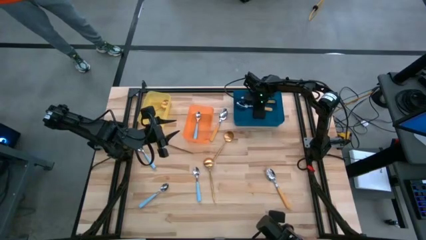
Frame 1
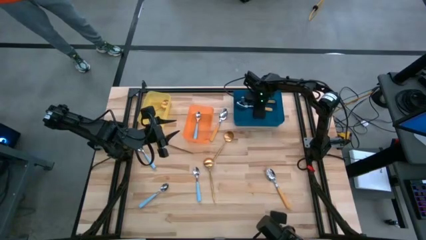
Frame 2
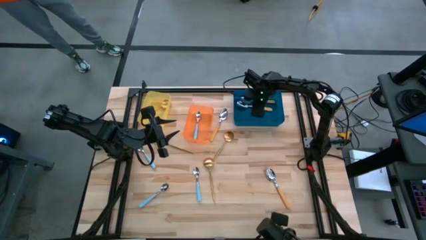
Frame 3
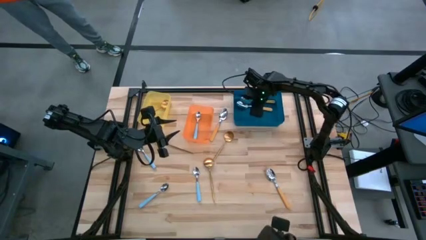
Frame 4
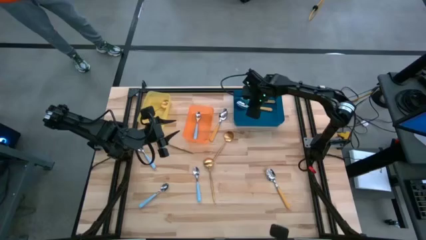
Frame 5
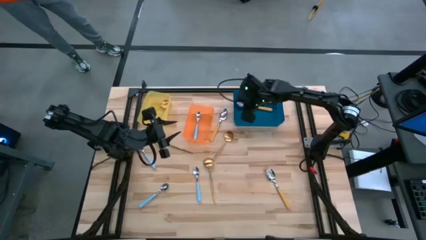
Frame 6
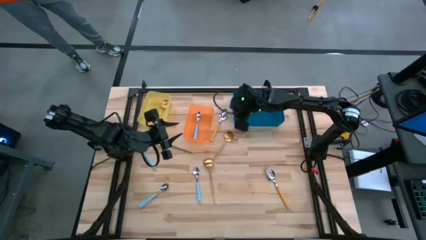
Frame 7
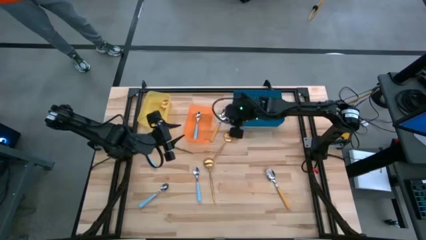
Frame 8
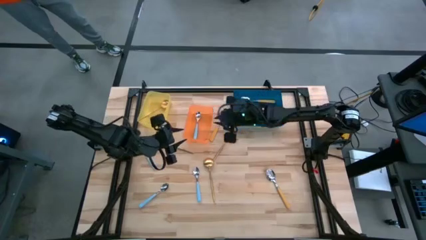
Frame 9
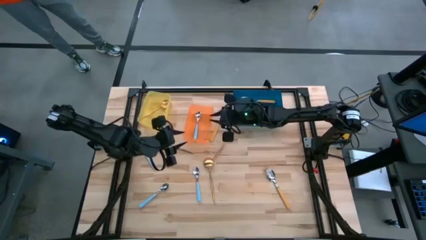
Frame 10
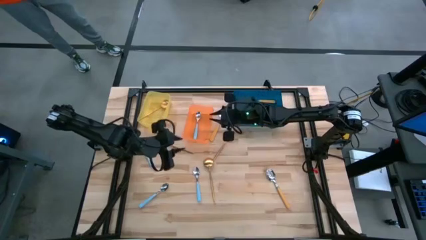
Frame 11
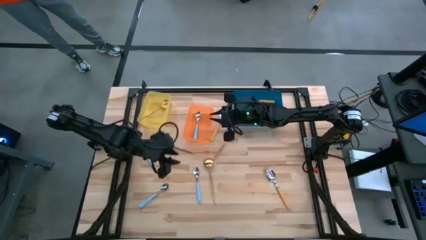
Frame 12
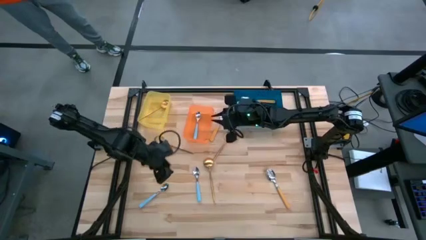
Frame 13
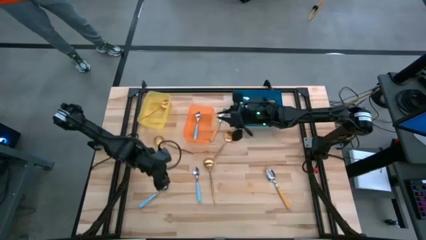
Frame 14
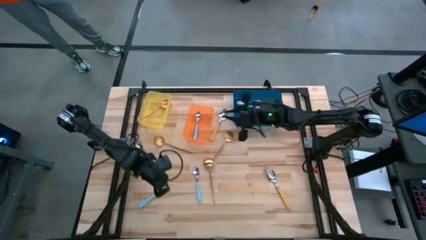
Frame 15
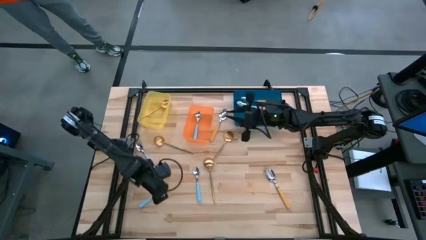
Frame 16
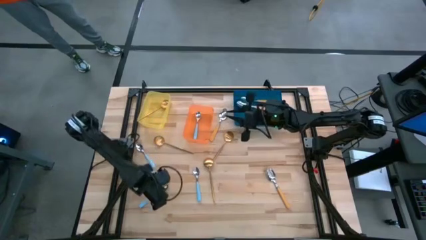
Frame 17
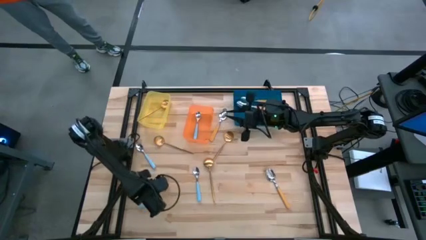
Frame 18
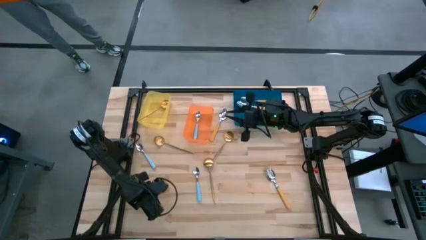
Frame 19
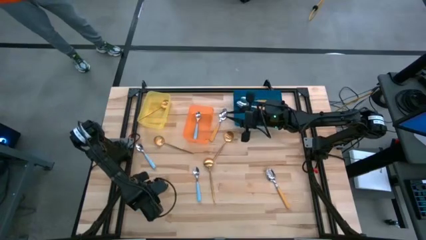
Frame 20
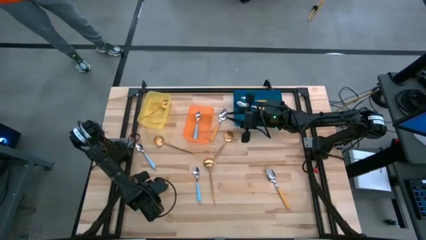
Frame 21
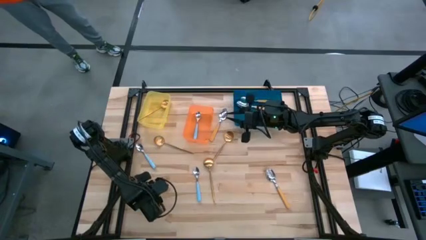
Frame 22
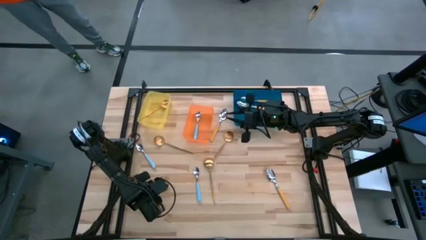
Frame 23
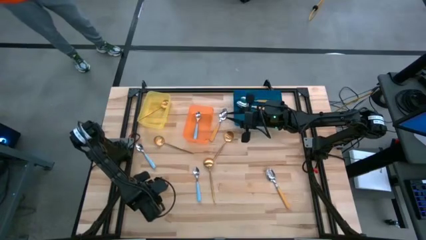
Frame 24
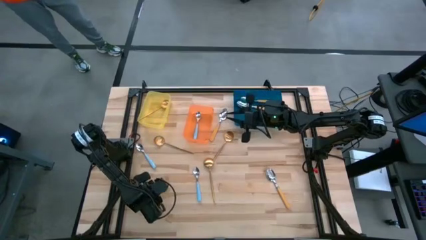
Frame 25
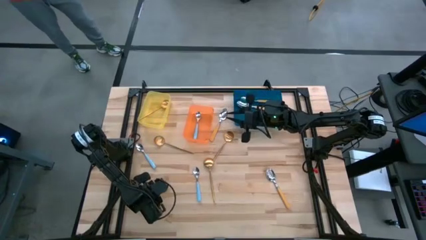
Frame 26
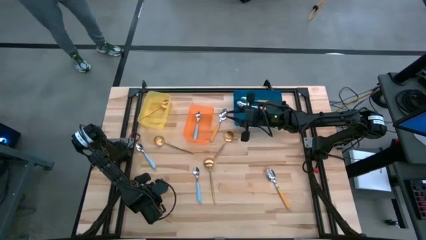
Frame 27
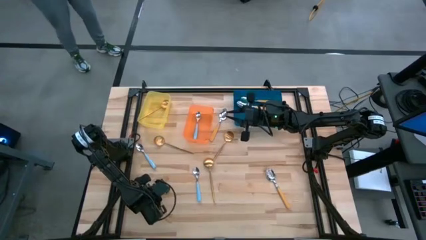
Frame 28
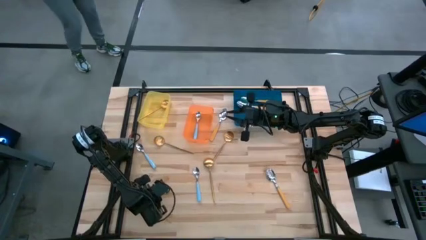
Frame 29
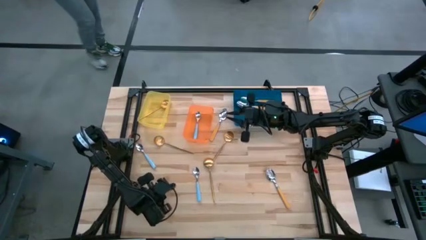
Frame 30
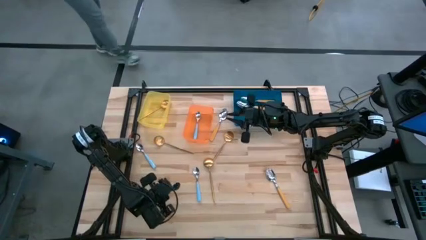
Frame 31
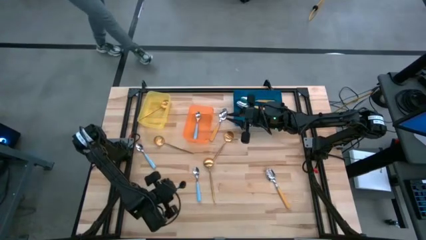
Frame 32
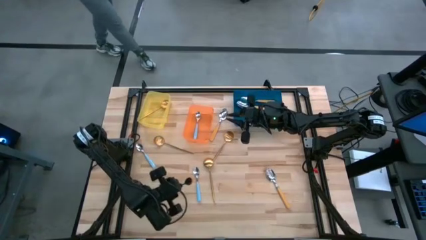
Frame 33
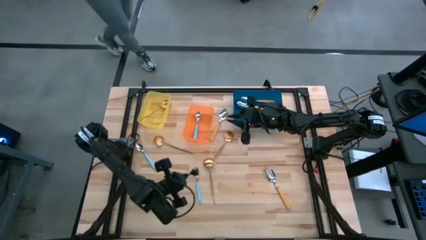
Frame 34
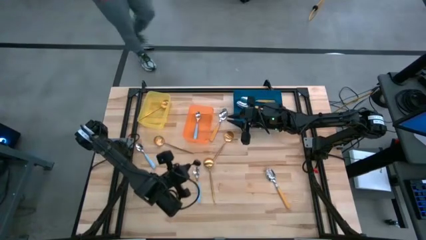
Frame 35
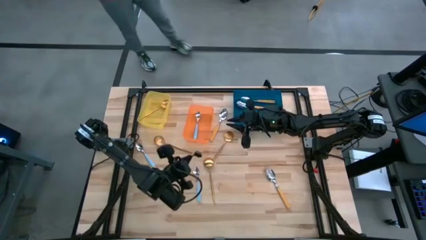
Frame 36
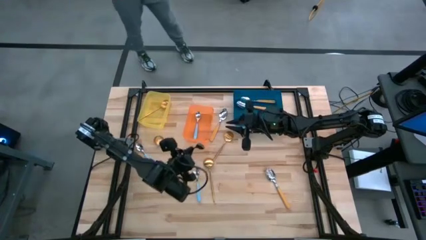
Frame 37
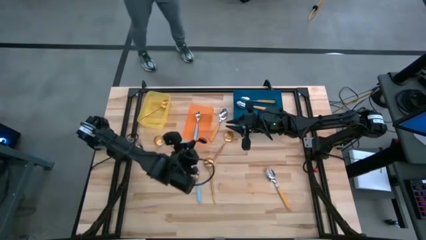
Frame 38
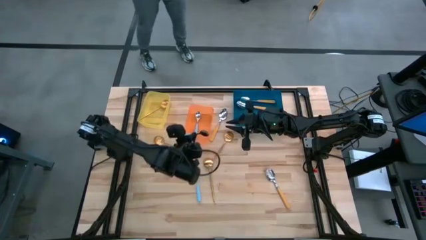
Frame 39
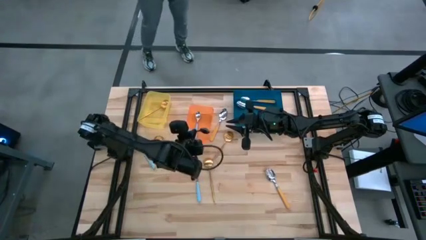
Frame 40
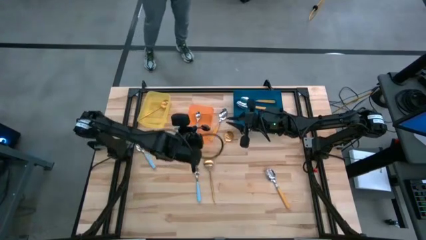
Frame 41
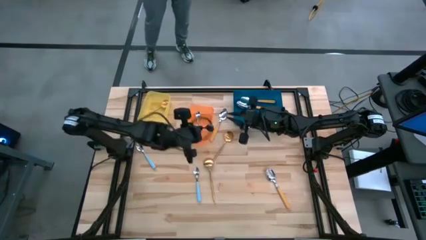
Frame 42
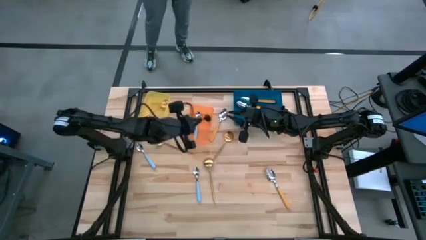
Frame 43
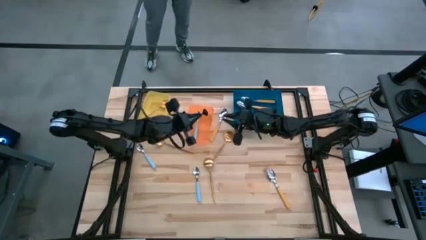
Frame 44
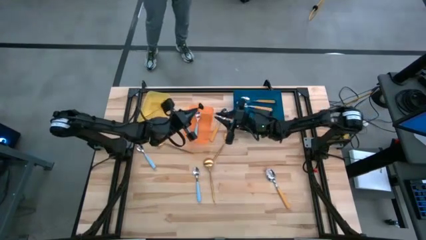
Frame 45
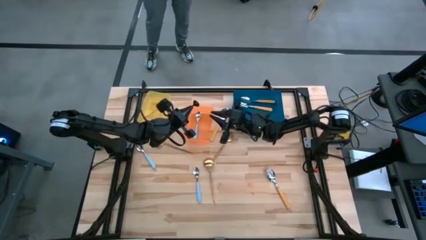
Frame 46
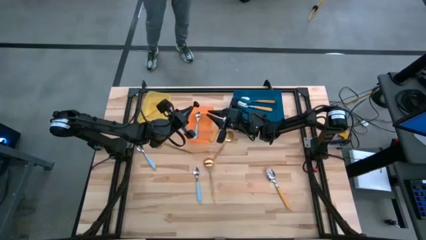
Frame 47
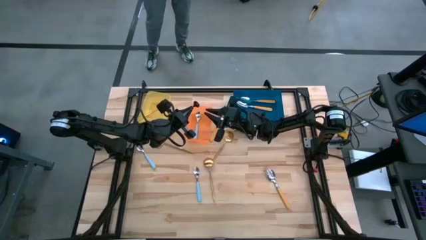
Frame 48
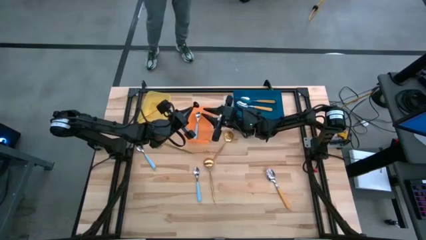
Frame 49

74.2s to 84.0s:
Task: Sort silverware by color (type)
Put the blue spoon into the orange bin

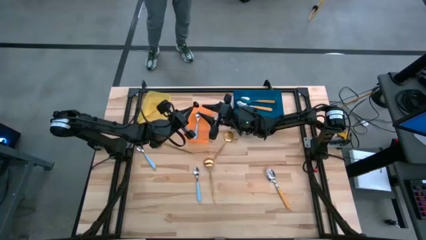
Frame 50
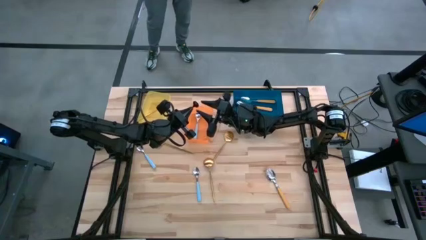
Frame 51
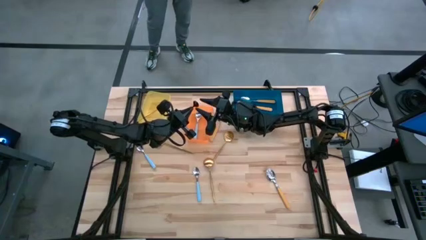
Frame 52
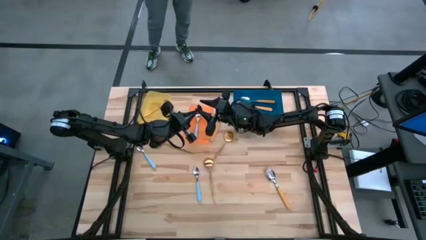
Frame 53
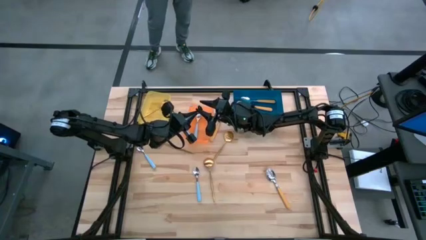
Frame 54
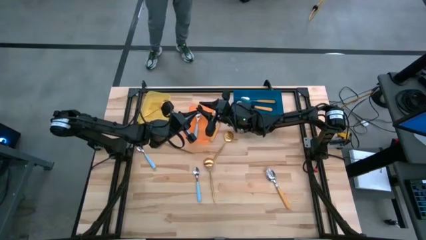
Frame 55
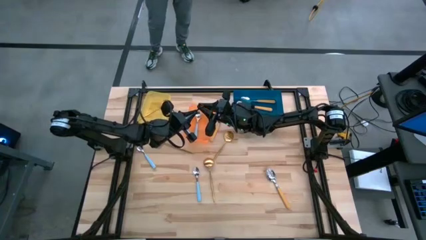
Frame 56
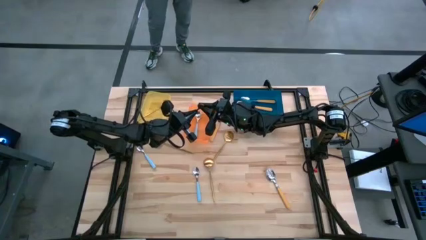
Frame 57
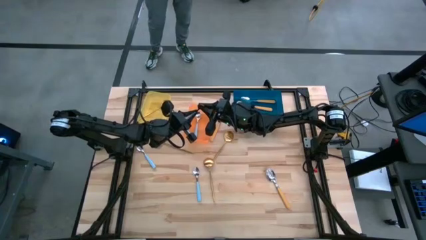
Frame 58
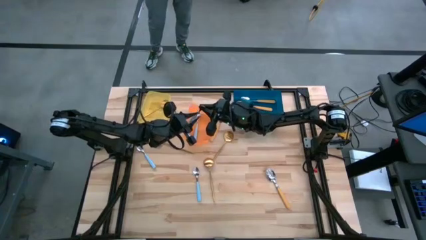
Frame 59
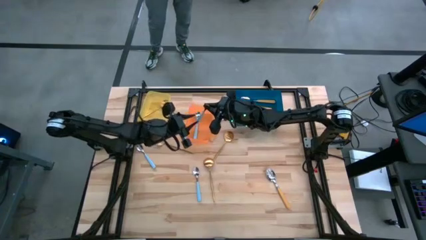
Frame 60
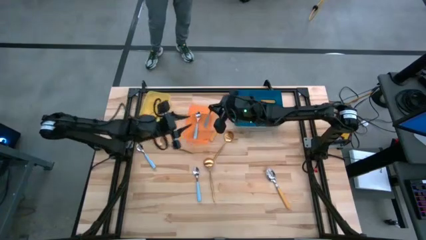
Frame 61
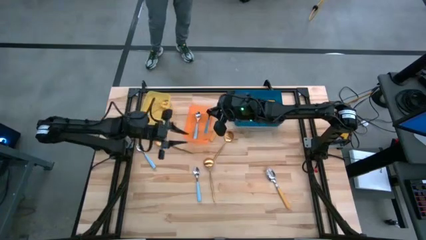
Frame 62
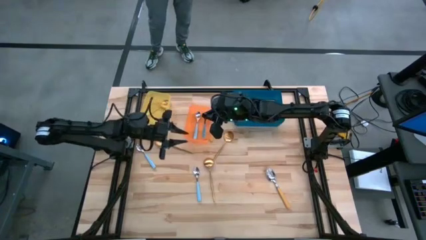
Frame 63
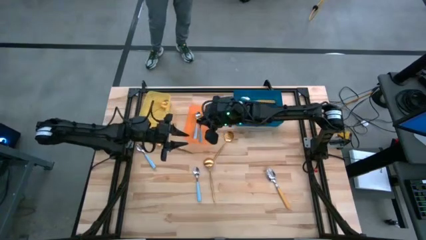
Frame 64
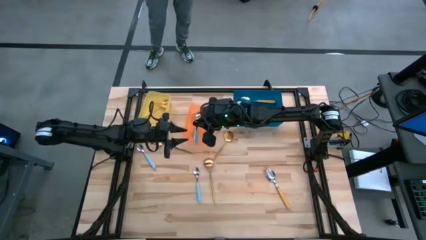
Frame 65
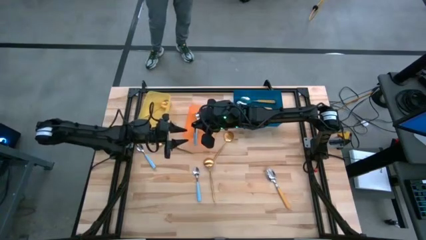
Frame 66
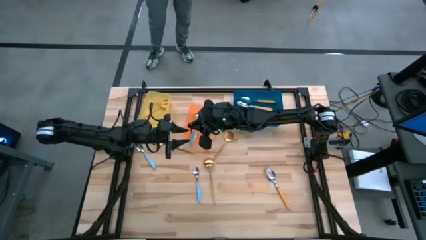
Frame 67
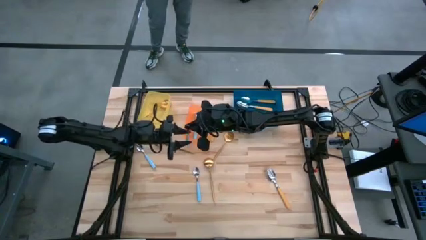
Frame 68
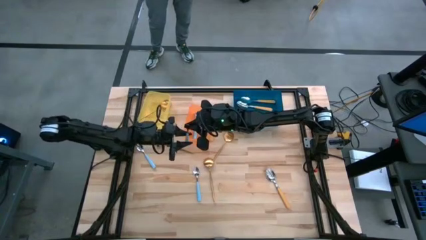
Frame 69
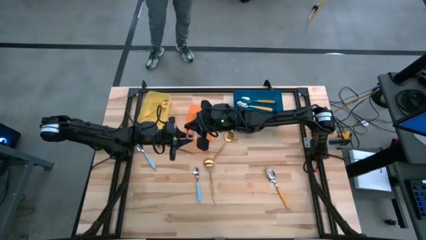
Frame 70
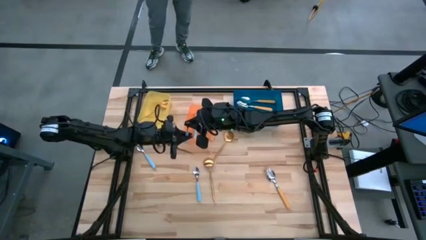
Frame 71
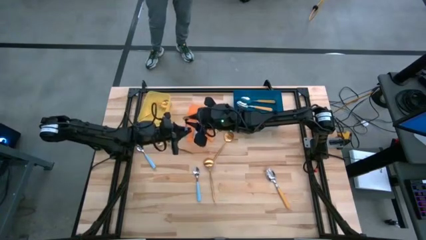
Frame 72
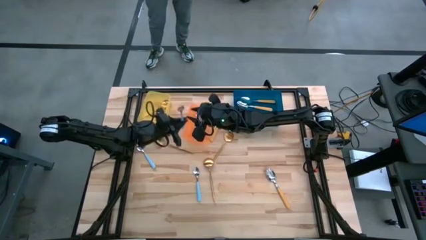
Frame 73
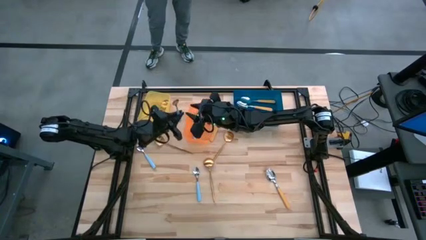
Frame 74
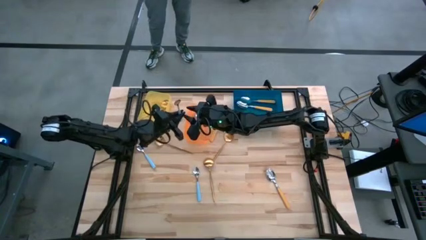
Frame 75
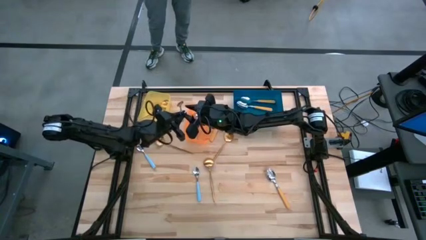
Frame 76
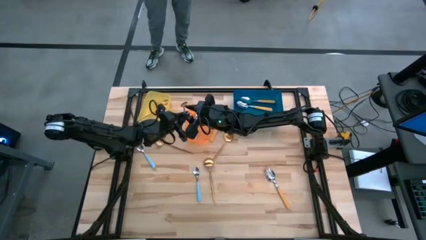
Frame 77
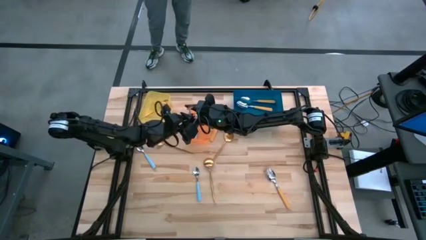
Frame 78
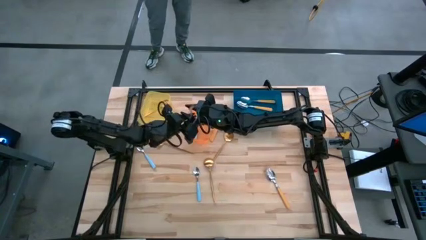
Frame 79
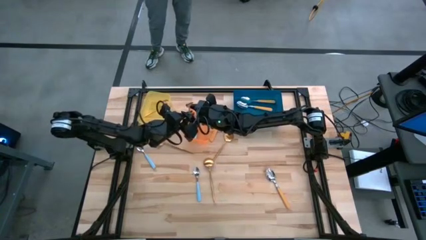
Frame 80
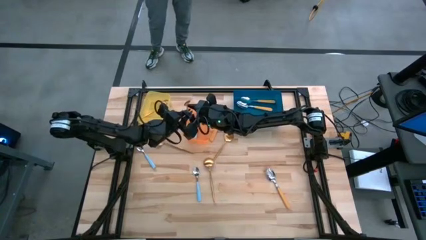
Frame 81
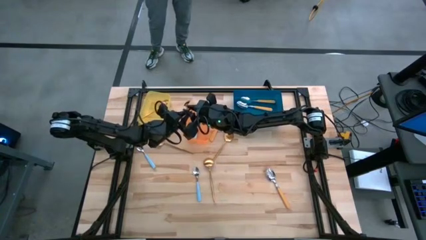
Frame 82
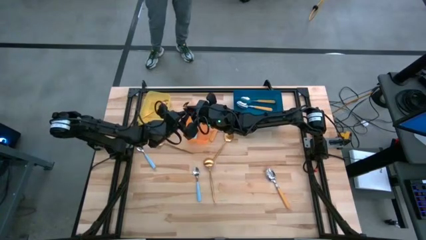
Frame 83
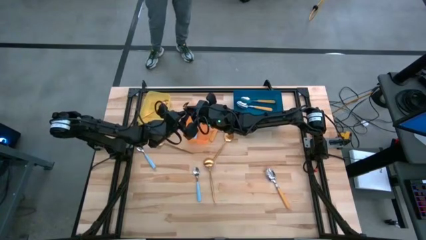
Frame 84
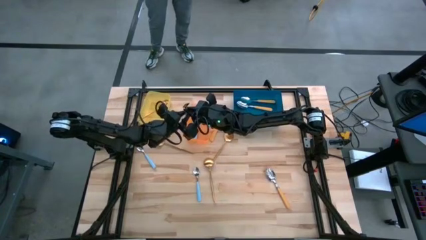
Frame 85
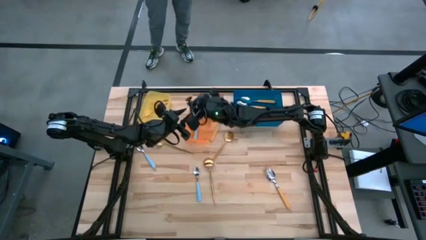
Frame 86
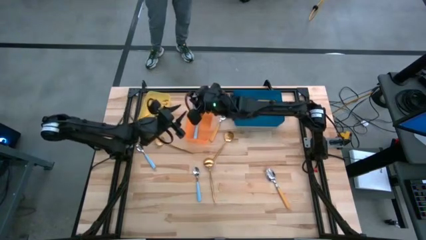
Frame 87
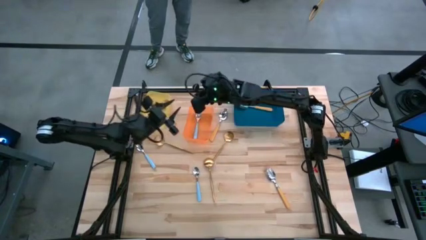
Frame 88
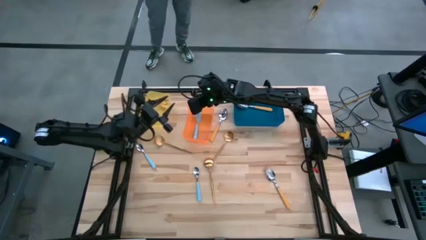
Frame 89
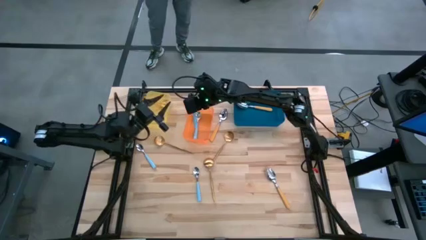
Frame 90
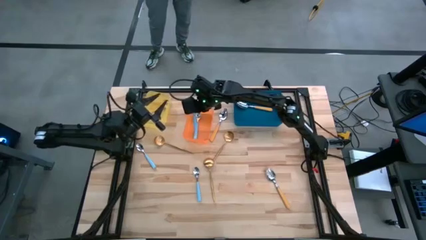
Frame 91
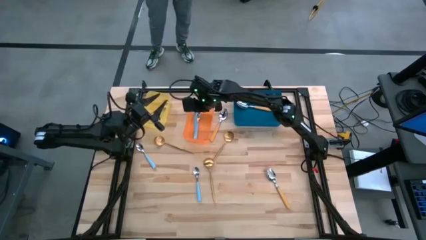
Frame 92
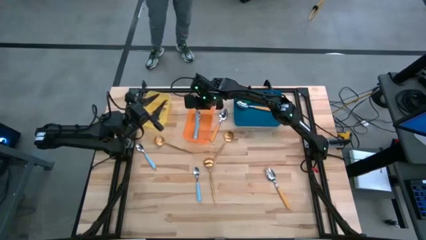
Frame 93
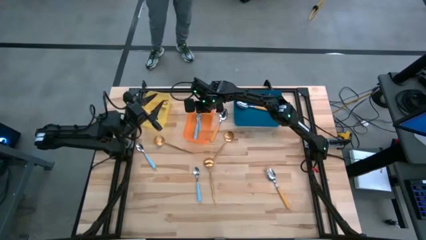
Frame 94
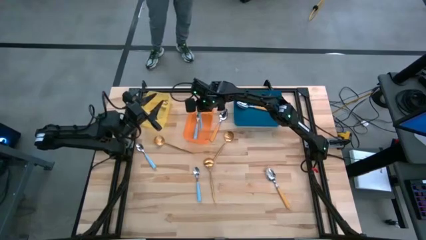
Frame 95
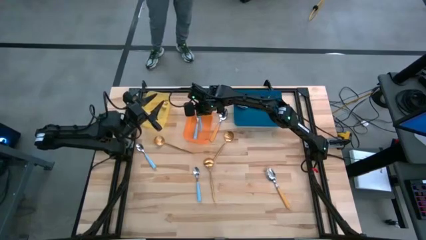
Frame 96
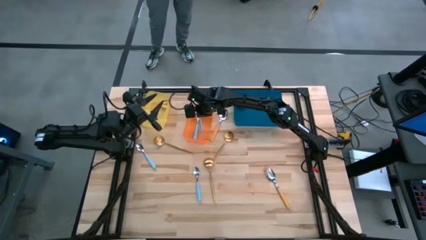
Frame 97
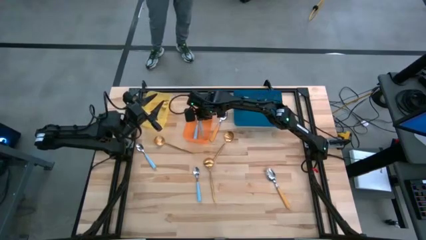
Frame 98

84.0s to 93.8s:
Put the blue spoon into the orange bin
